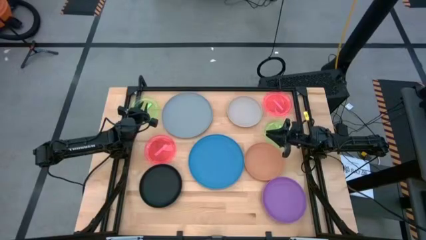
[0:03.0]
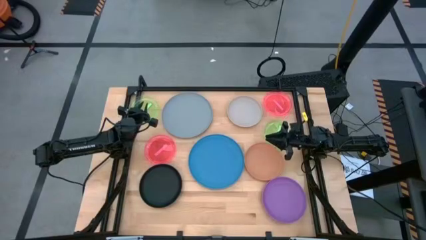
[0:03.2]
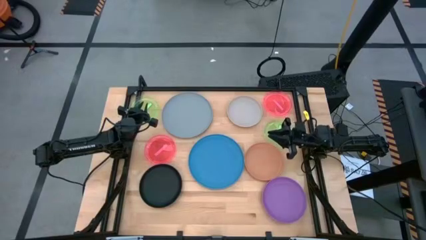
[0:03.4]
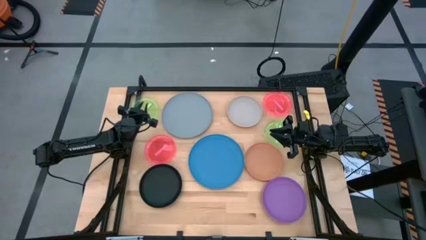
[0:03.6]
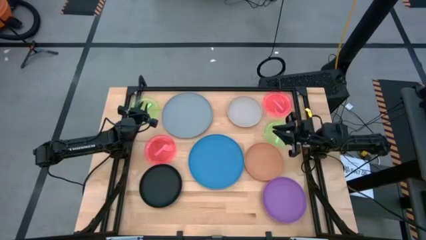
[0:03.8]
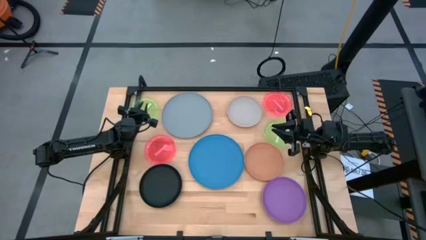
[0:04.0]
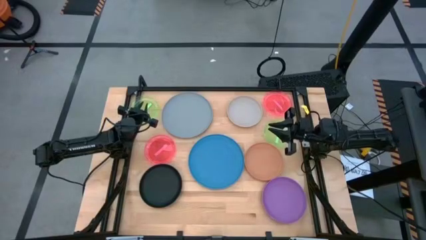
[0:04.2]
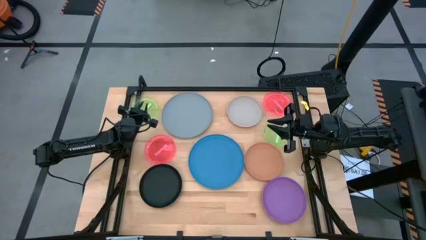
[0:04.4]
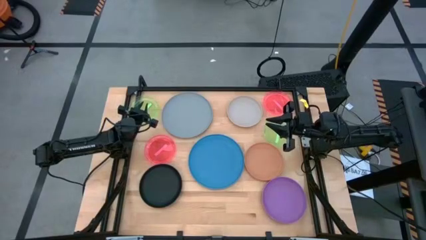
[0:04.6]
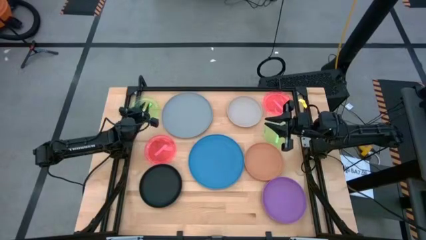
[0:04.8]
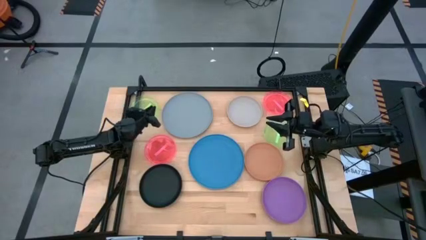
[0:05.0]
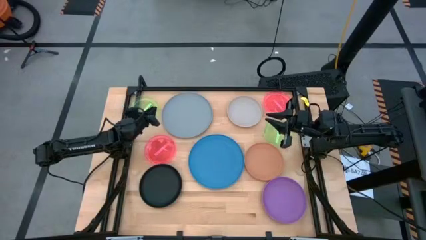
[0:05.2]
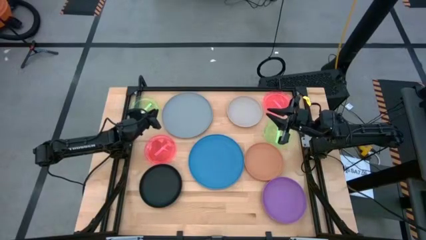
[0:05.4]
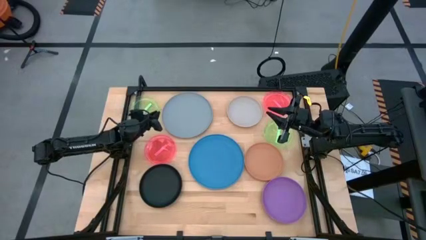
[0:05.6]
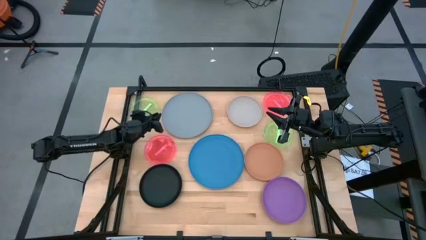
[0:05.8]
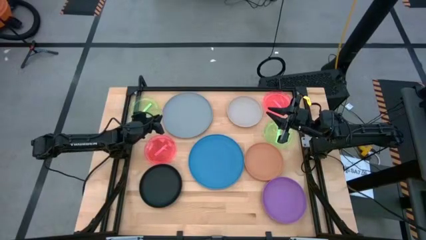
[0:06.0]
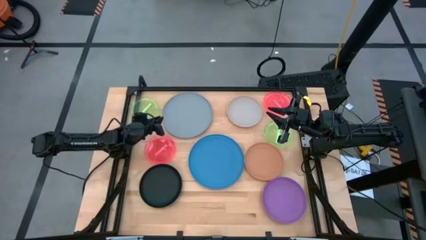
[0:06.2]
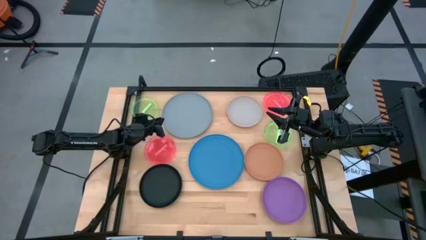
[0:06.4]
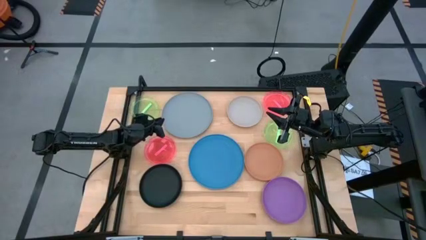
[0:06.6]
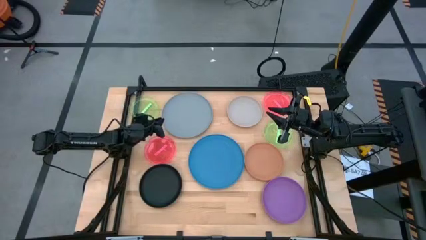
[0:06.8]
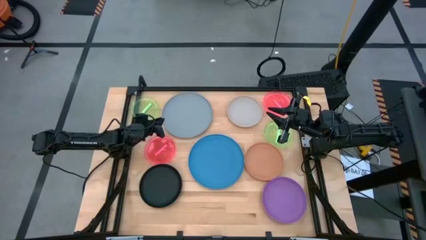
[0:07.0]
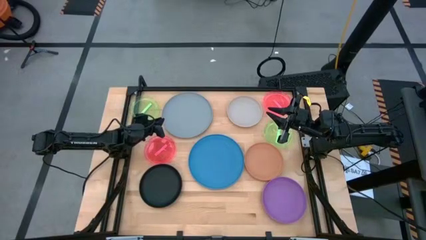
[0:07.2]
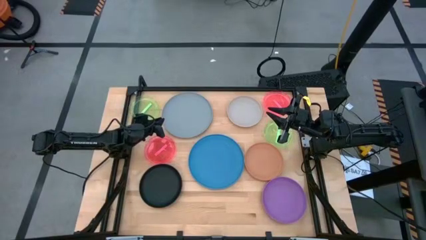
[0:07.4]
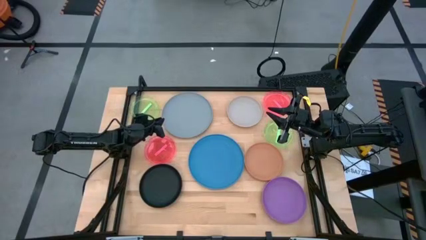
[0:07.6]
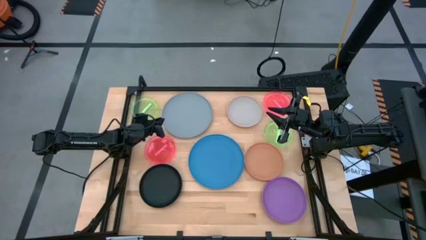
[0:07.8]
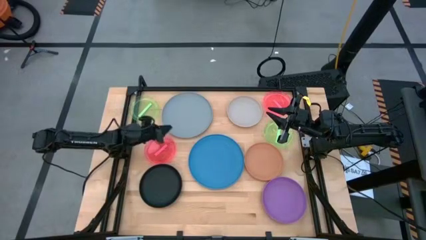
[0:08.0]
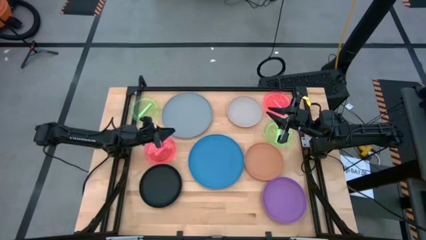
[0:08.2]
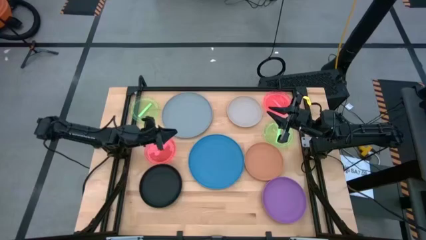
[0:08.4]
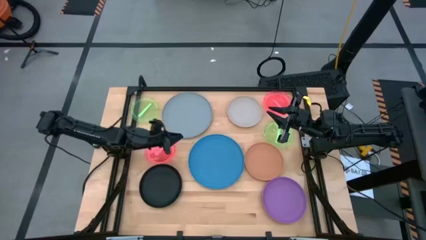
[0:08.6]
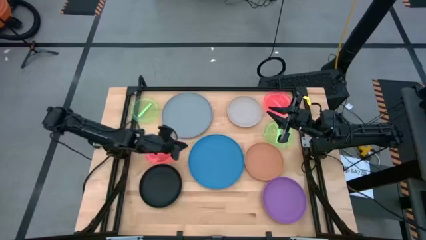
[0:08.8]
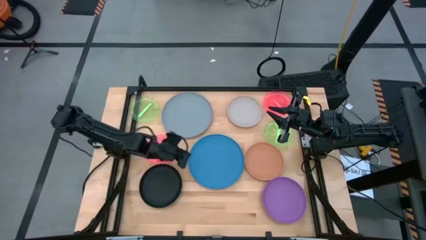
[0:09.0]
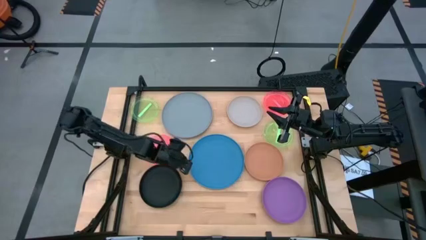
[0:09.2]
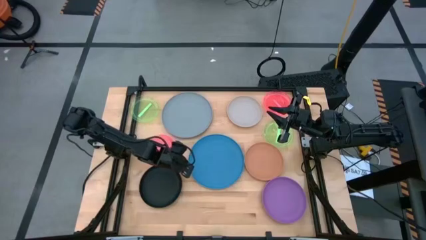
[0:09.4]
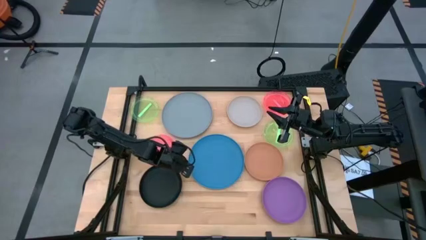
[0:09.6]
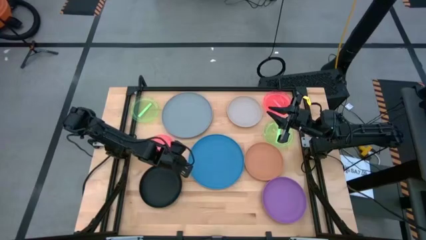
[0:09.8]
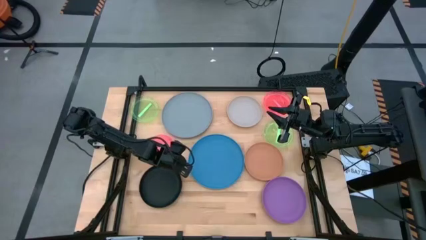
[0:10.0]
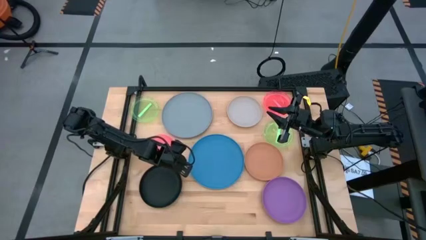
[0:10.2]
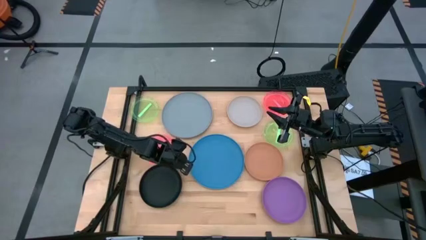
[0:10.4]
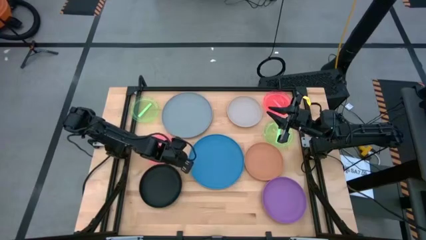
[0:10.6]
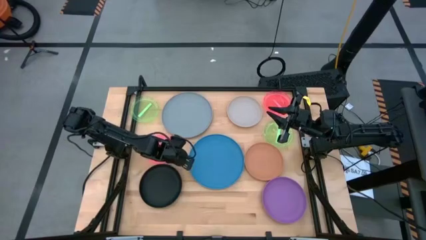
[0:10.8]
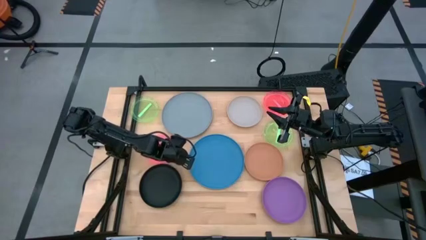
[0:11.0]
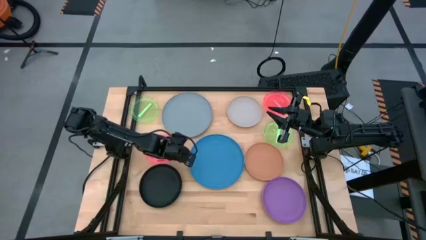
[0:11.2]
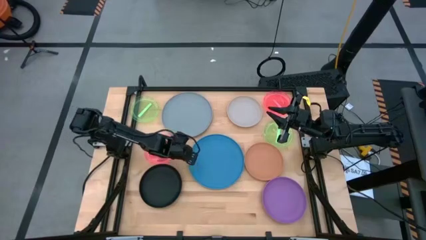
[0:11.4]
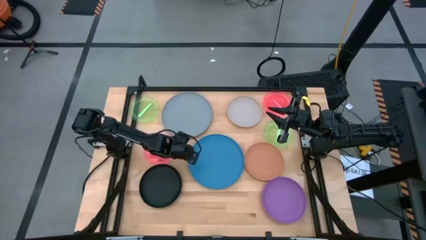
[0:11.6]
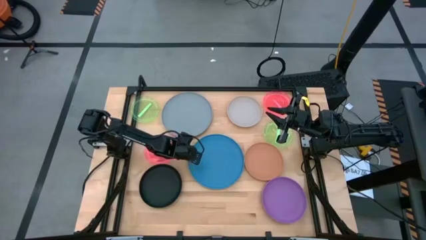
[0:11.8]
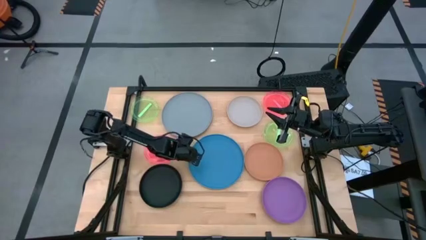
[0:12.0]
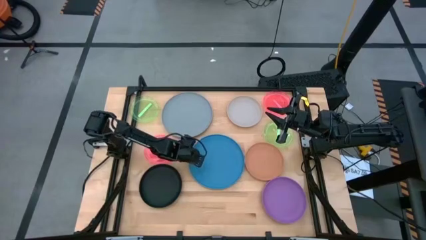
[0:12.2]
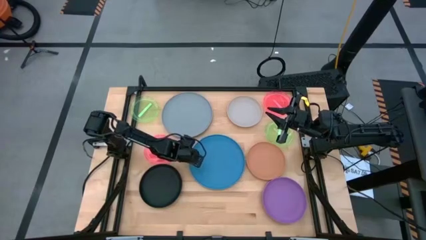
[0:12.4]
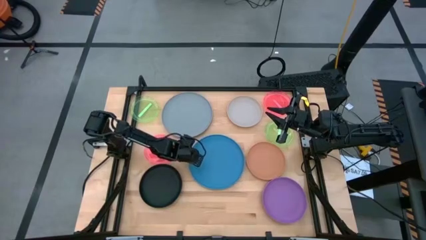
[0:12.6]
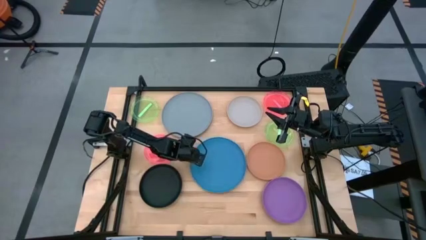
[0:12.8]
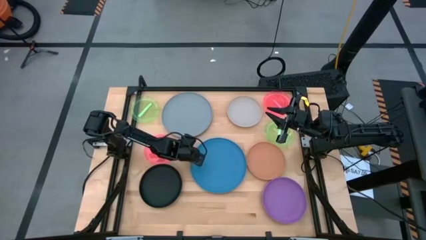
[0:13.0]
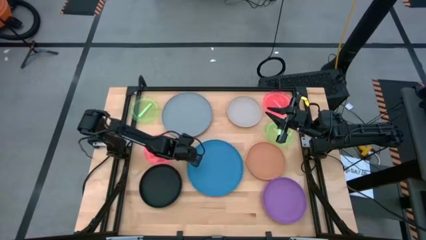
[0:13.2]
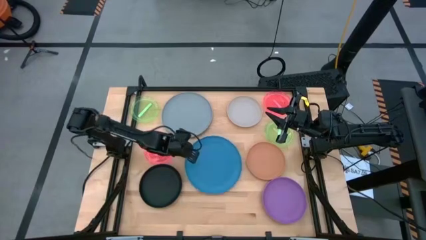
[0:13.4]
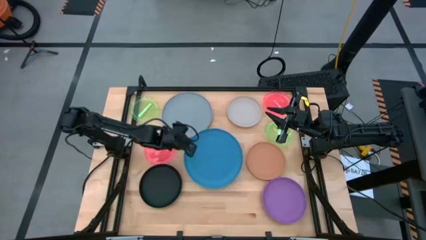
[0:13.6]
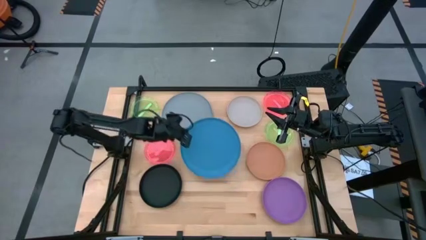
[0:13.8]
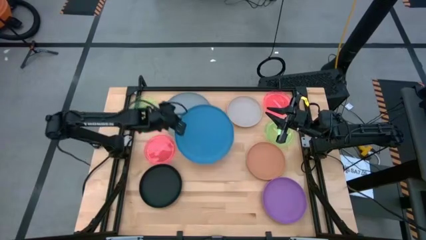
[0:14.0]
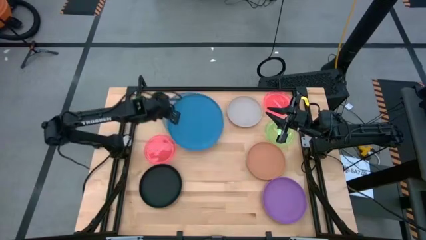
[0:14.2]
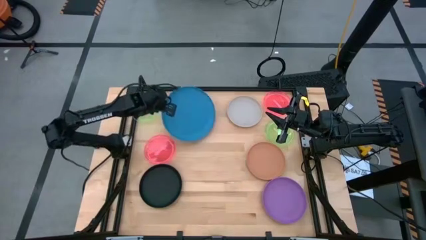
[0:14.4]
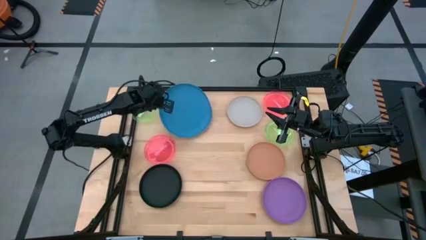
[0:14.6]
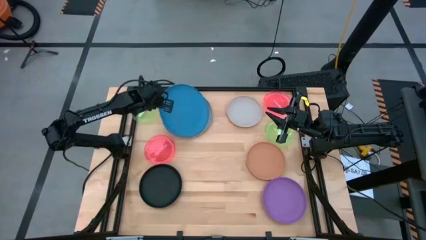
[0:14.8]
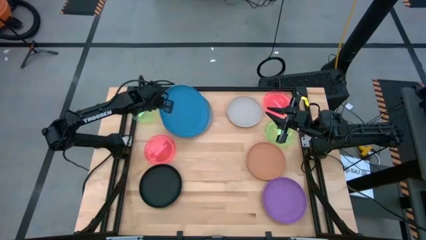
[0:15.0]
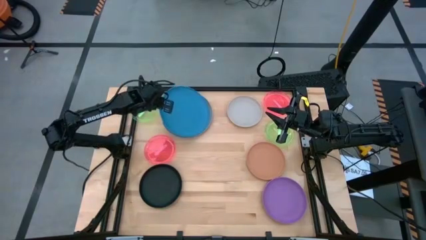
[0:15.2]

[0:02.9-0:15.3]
Task: Stack plastic plates
Stack the blue plate on the white plate
